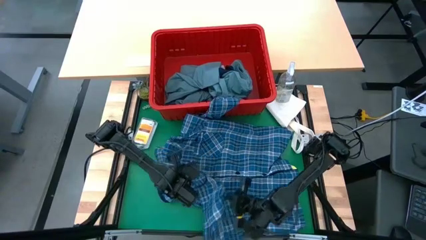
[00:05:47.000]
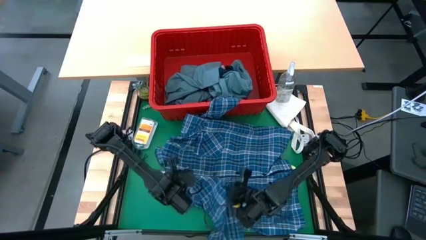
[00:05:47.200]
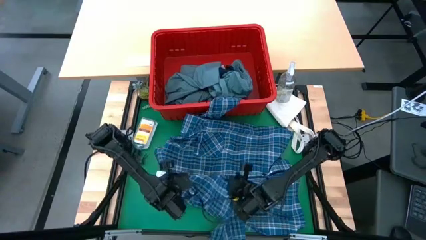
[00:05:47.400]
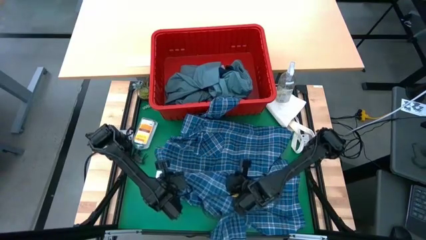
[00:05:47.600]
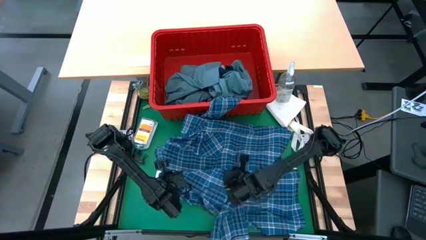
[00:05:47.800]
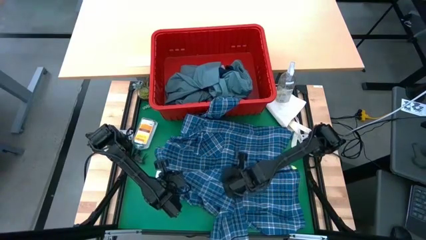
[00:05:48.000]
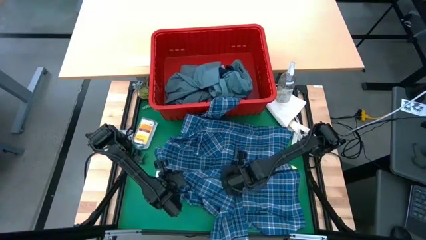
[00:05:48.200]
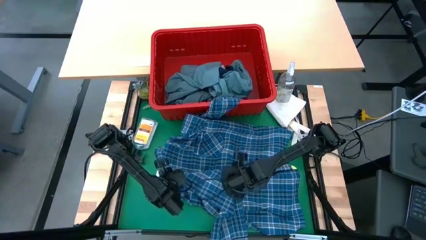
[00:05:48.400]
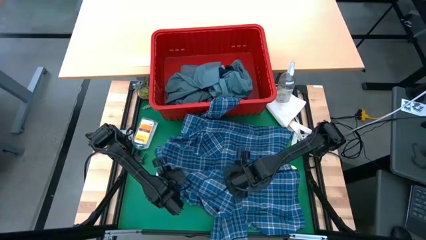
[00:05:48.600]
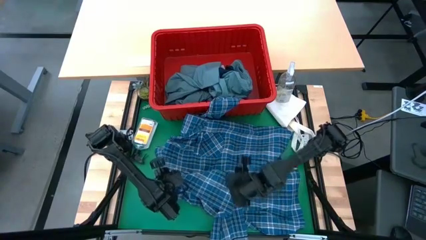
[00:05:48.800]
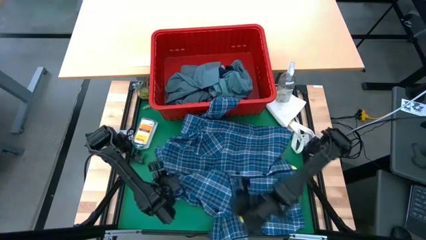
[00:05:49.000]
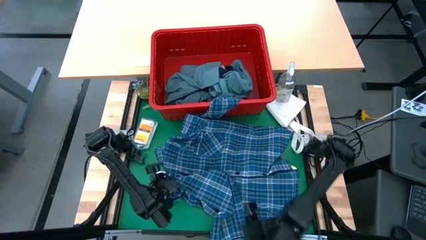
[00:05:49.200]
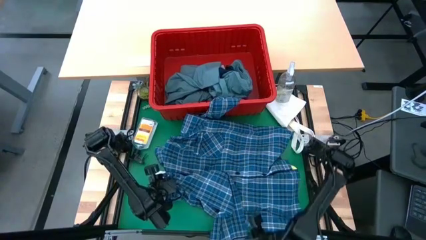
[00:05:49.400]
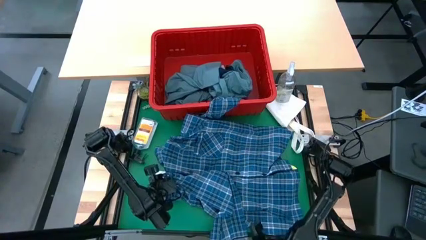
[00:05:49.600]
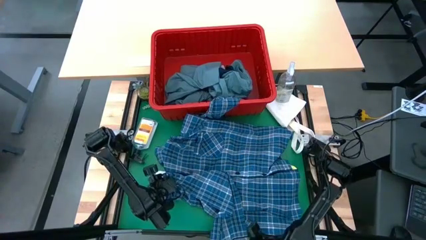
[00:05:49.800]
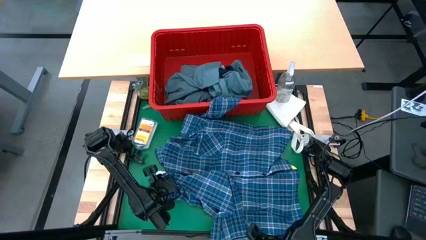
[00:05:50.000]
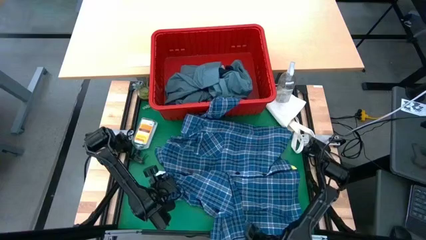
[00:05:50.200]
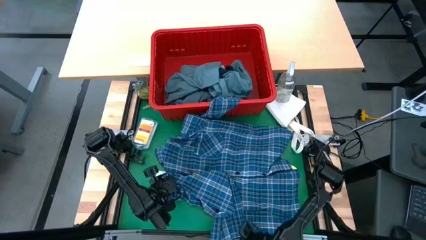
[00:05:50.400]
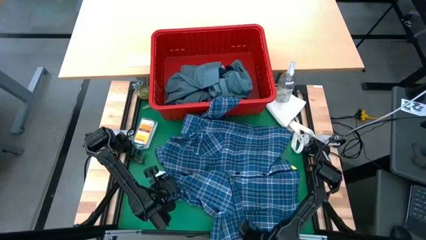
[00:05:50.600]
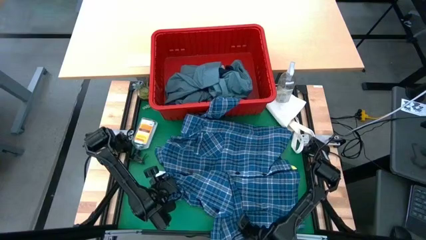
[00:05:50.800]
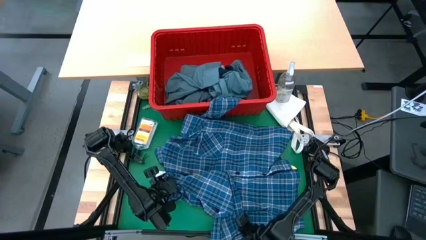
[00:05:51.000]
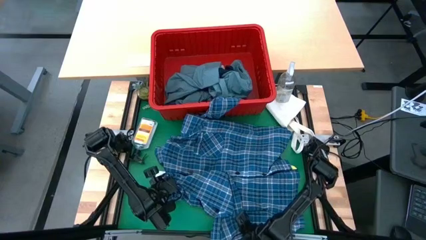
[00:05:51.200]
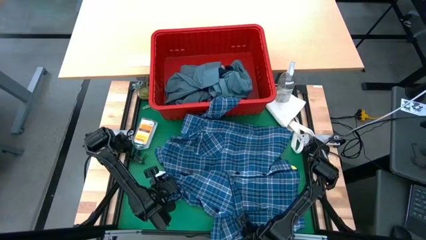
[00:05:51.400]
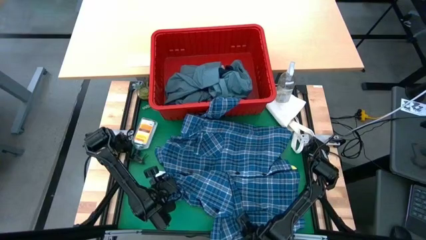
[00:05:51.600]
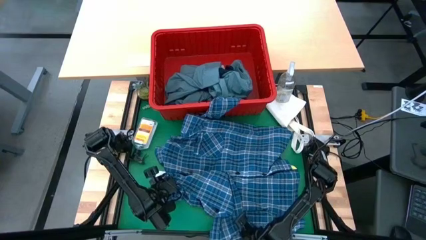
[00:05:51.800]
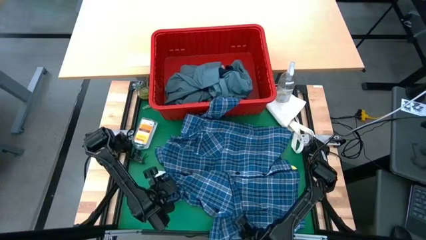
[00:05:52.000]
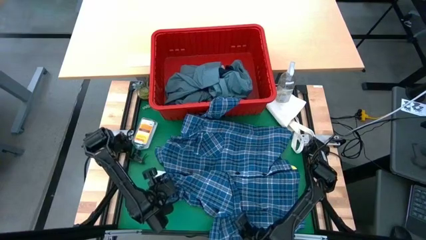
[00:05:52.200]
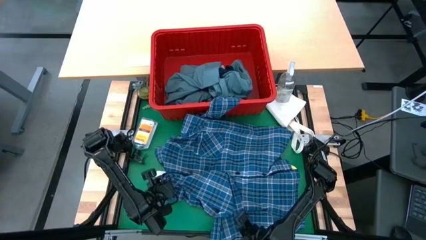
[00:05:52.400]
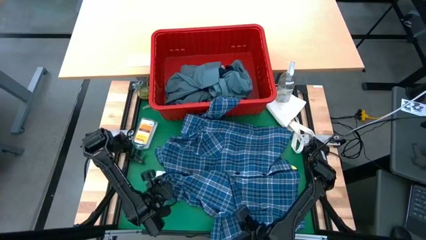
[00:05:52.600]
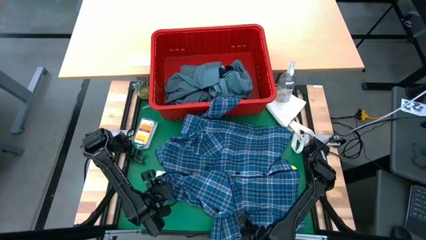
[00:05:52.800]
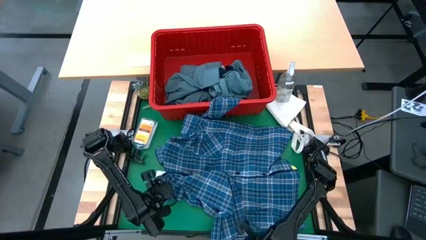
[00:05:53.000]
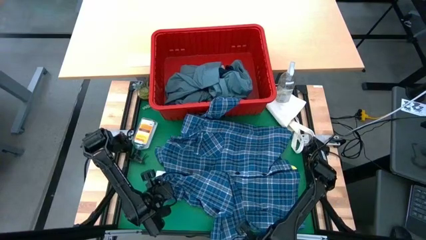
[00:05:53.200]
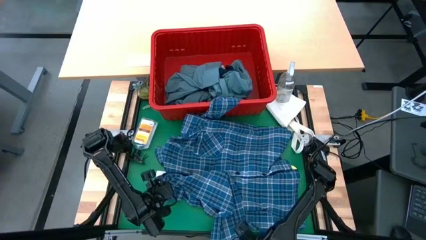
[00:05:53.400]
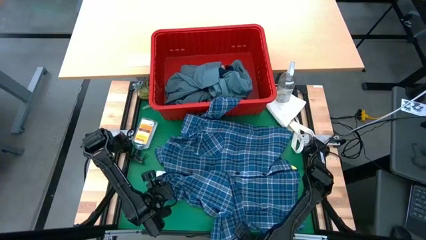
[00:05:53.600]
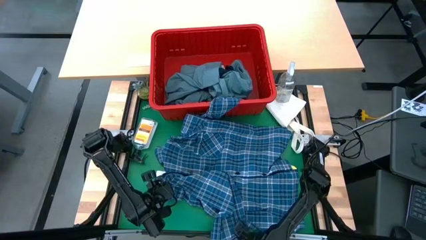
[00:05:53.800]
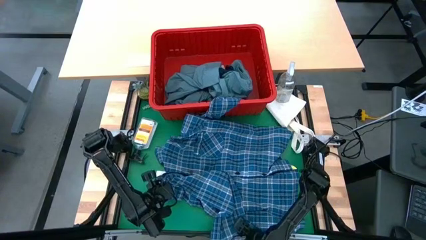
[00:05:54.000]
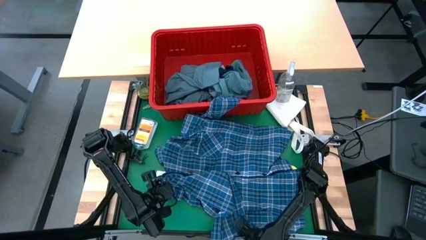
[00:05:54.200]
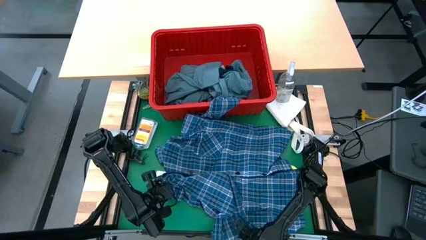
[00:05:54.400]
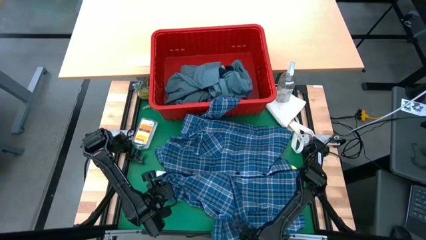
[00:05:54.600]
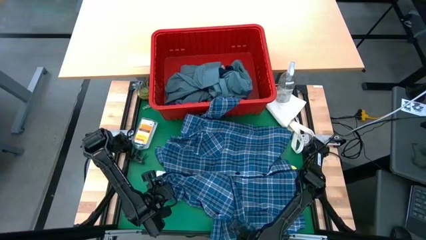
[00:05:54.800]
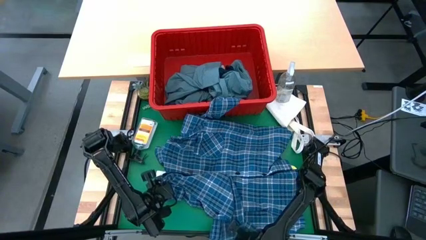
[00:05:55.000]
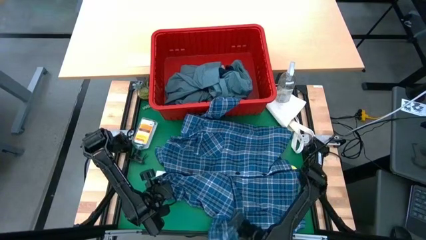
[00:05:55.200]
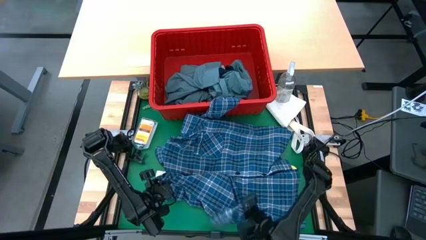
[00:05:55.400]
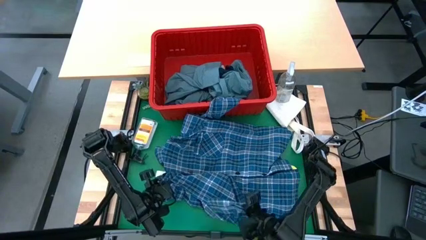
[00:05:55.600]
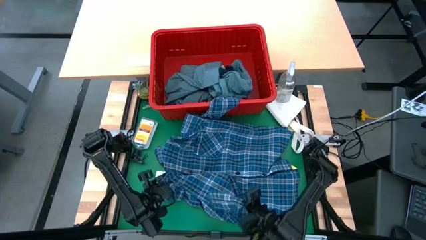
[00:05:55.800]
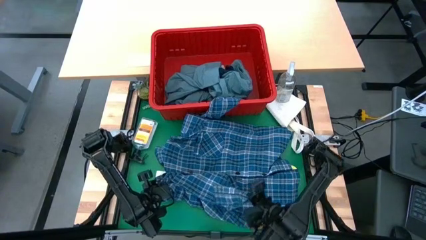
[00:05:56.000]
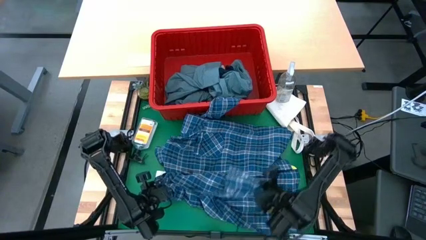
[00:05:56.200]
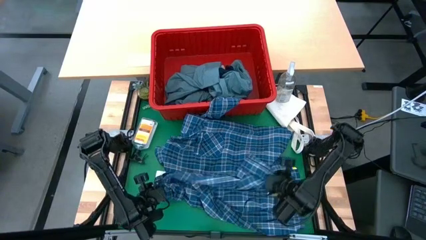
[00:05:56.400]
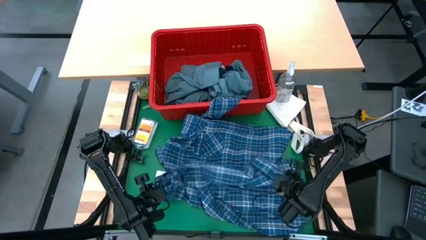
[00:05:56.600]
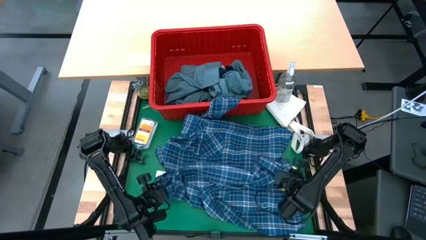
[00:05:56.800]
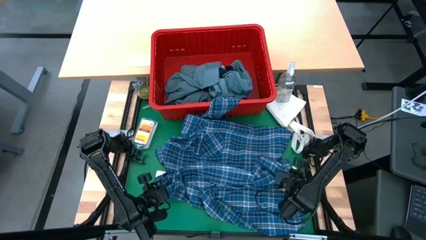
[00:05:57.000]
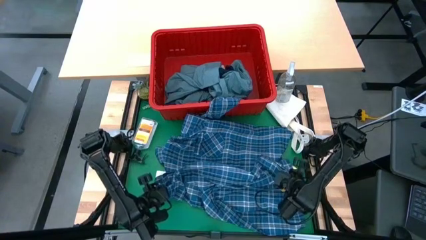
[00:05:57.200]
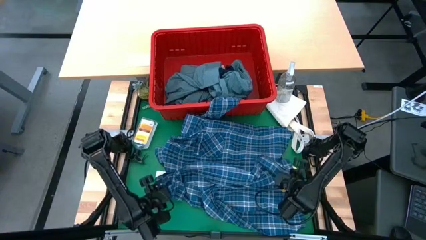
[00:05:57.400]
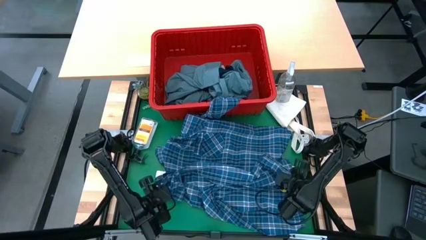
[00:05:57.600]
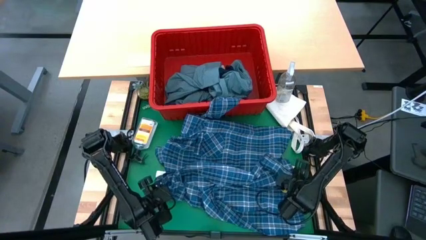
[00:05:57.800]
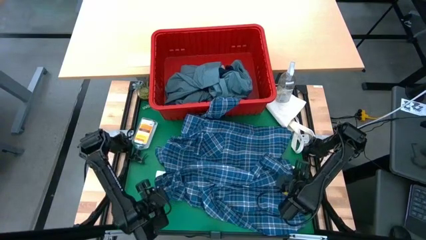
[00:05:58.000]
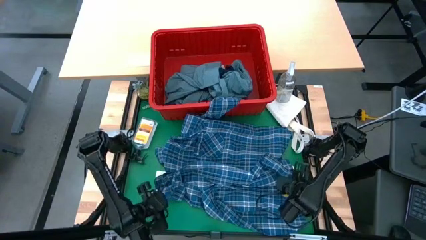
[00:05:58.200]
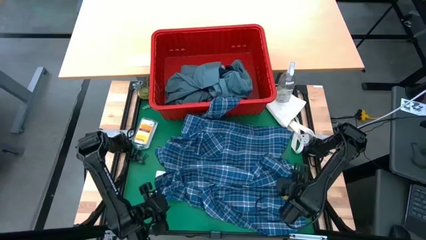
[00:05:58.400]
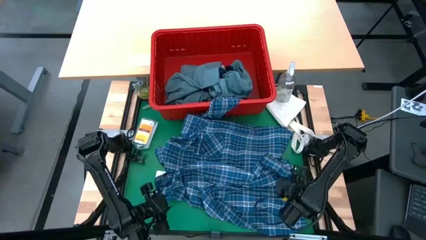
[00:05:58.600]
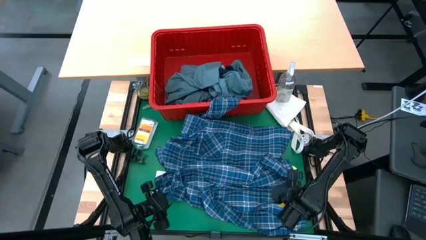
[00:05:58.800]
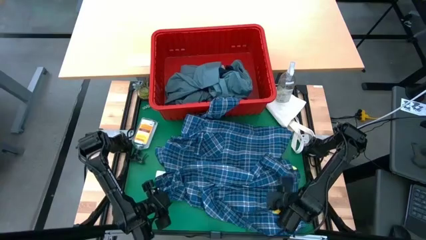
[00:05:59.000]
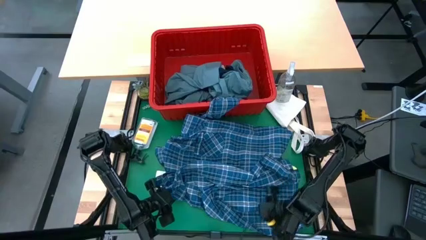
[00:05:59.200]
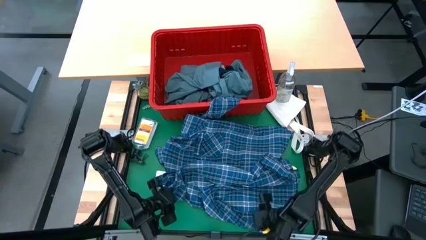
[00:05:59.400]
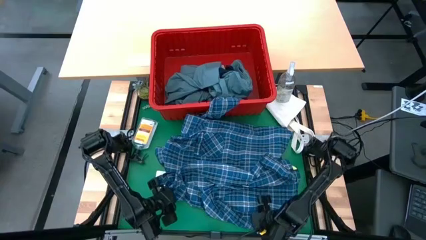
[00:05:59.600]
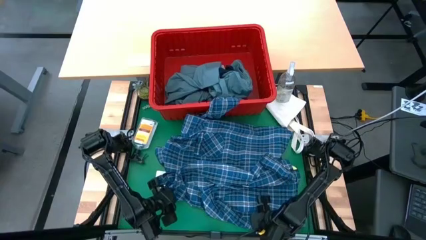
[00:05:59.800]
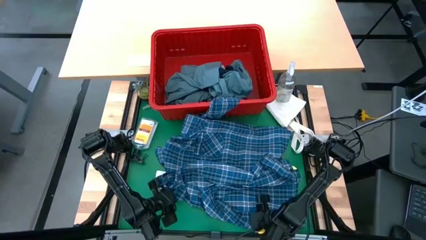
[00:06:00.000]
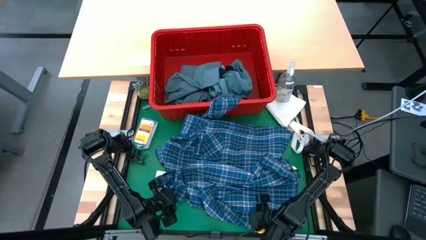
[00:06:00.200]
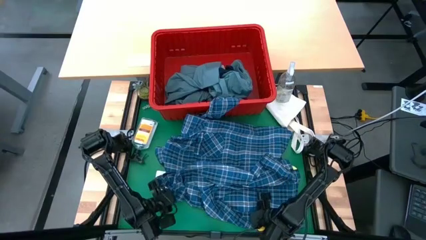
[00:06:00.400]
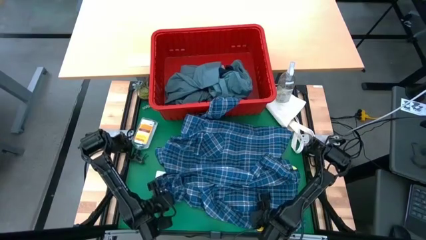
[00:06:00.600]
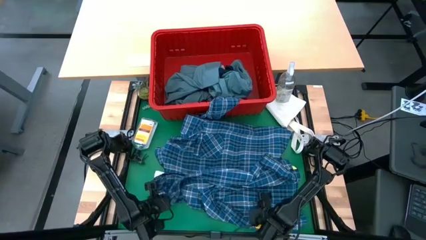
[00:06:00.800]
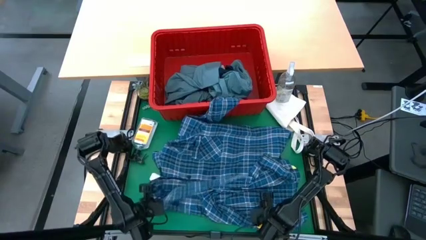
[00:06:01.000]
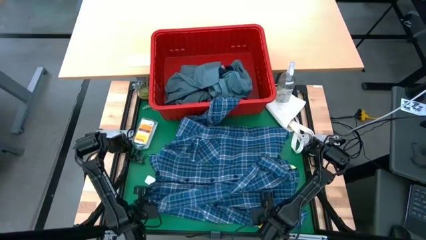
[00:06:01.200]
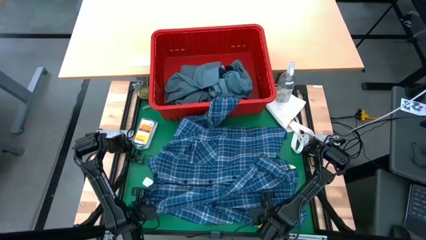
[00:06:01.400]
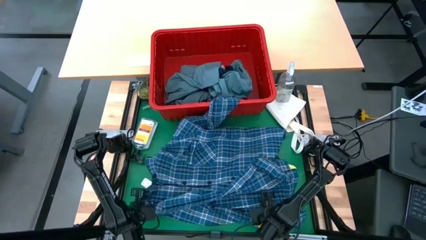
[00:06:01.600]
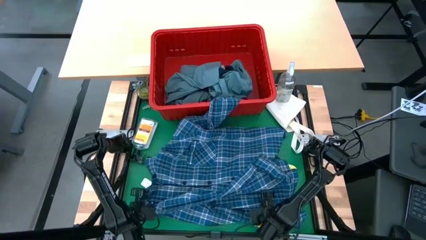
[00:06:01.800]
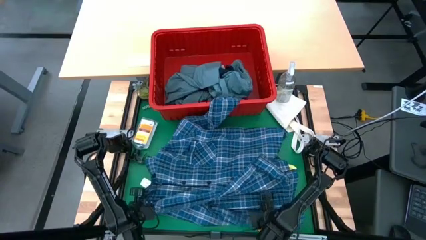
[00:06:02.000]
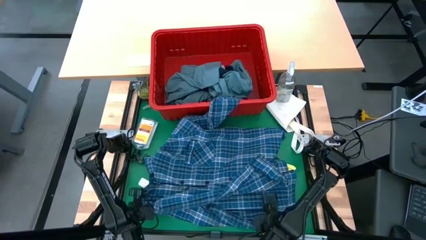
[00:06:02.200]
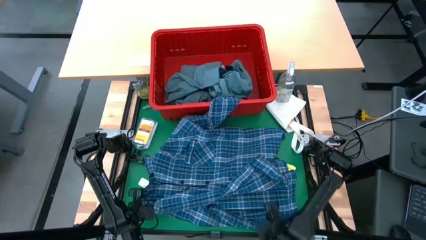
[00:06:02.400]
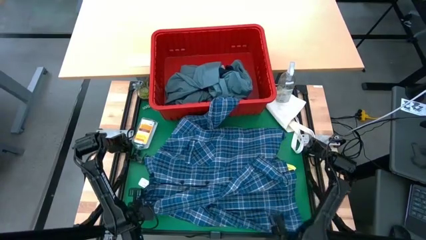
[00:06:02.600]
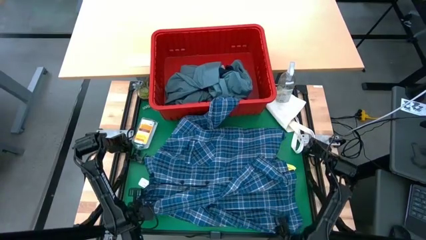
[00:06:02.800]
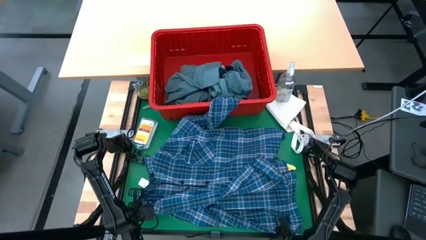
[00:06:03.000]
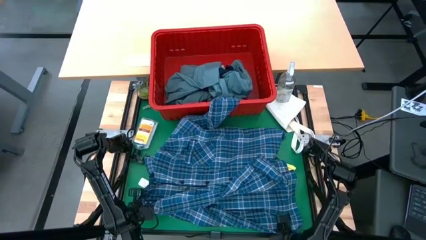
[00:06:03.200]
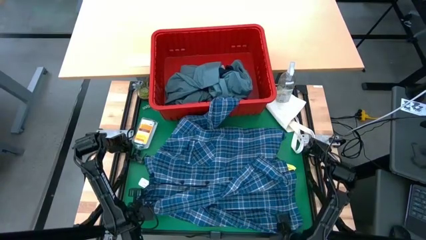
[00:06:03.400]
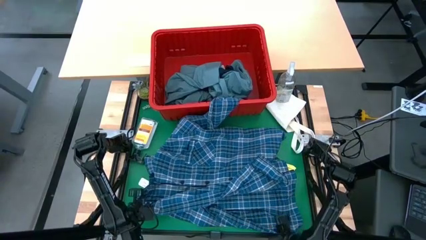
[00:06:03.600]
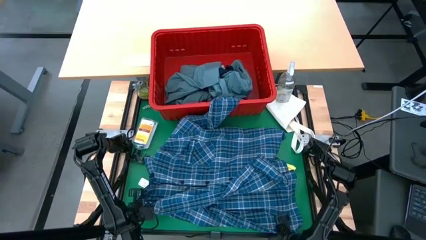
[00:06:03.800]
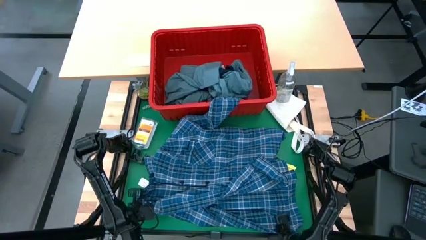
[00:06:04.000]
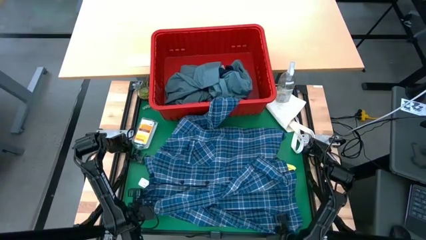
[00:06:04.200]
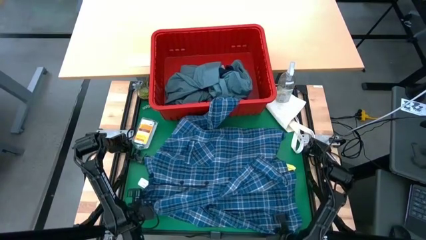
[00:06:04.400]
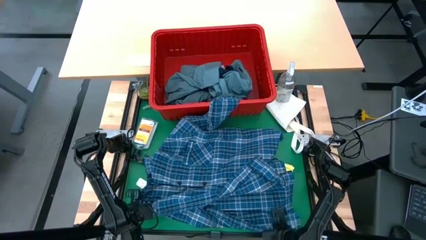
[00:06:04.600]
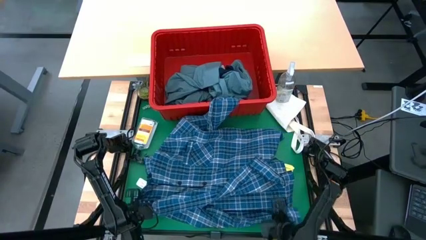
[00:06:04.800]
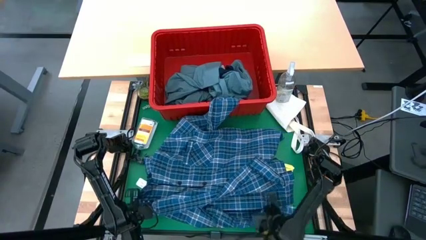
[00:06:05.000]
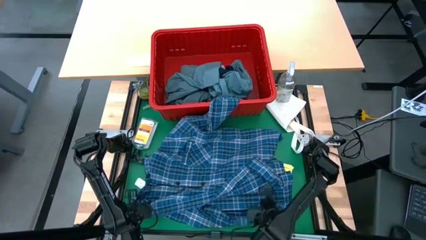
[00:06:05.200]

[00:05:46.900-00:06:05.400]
Task: Fold Laundry from Bin
Fold the blue shirt
